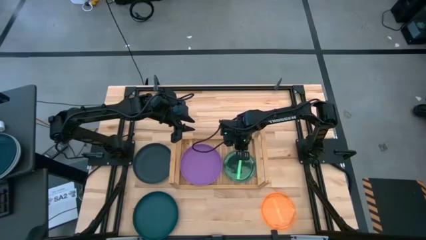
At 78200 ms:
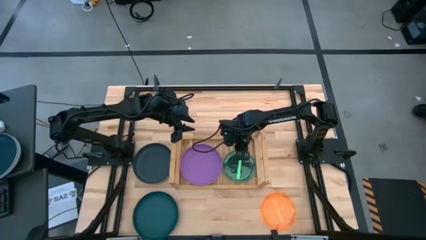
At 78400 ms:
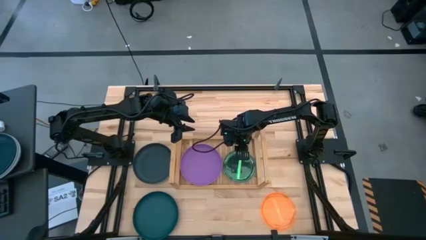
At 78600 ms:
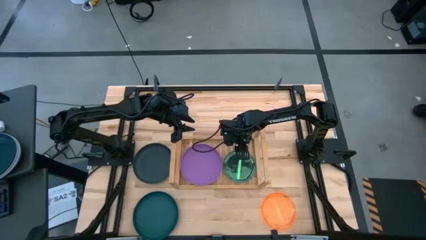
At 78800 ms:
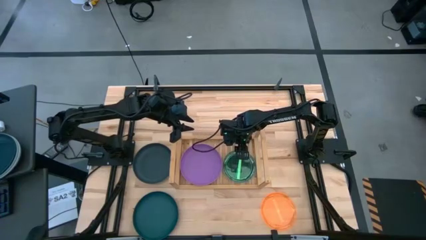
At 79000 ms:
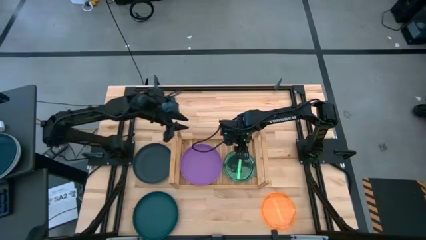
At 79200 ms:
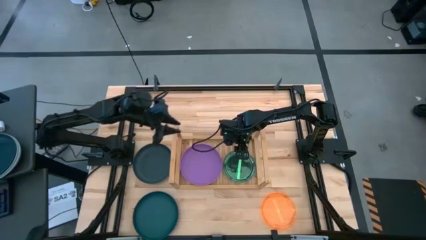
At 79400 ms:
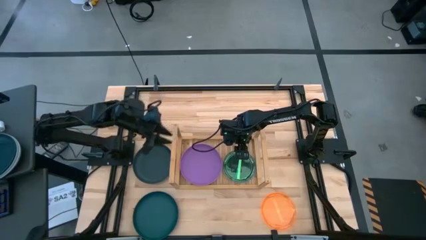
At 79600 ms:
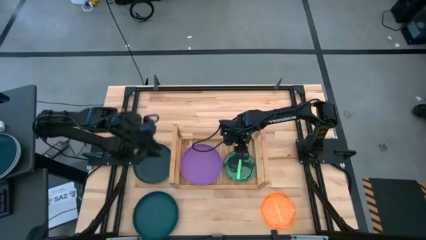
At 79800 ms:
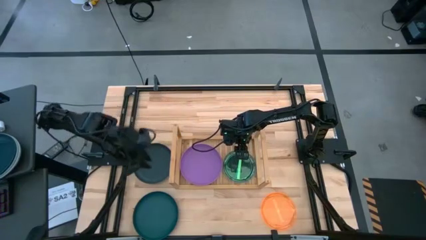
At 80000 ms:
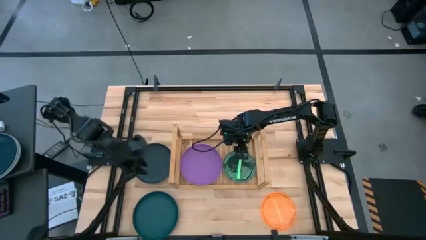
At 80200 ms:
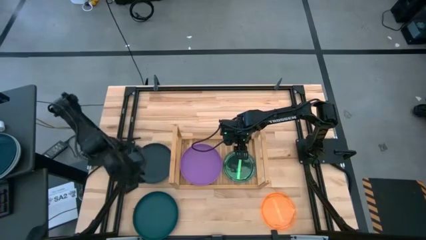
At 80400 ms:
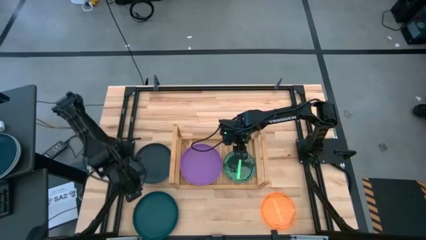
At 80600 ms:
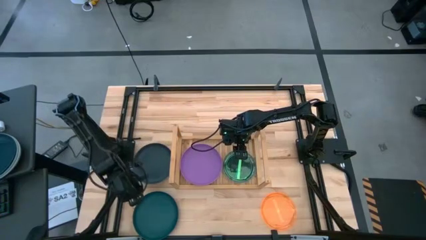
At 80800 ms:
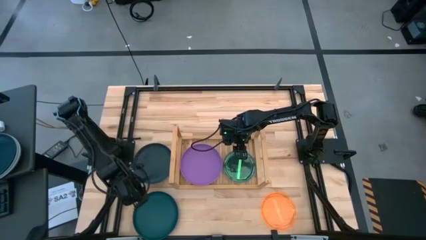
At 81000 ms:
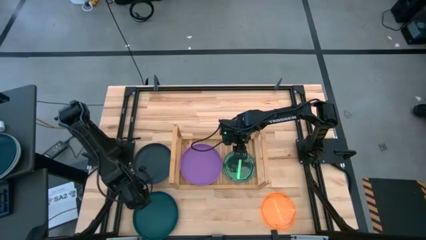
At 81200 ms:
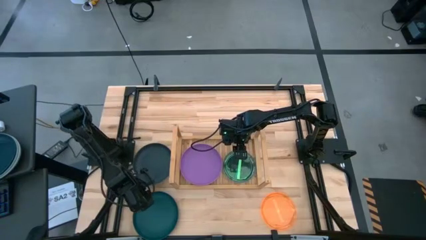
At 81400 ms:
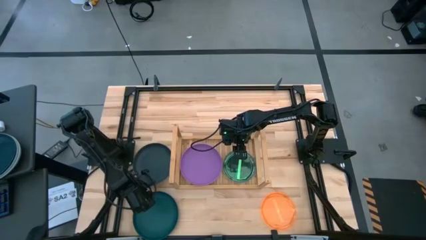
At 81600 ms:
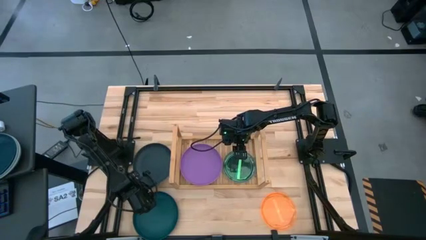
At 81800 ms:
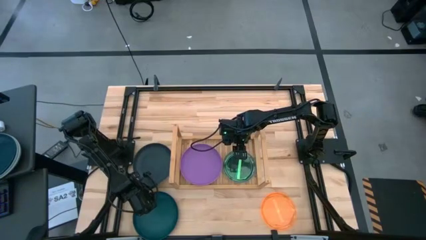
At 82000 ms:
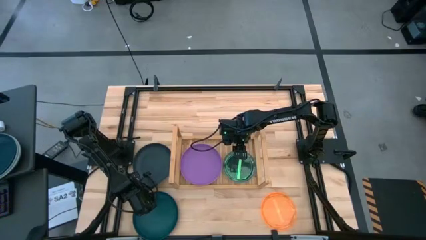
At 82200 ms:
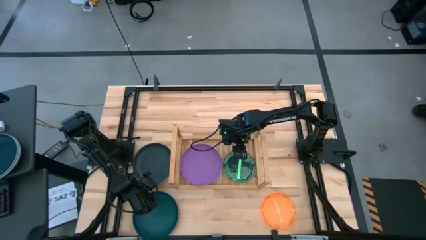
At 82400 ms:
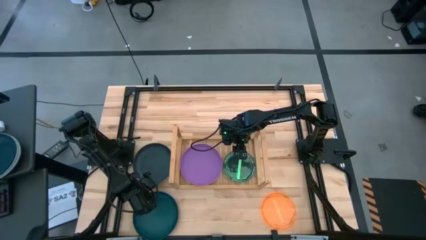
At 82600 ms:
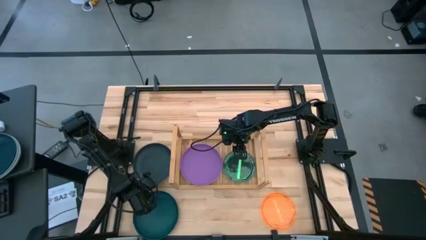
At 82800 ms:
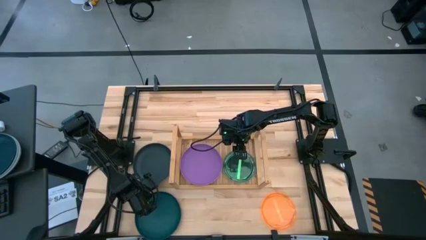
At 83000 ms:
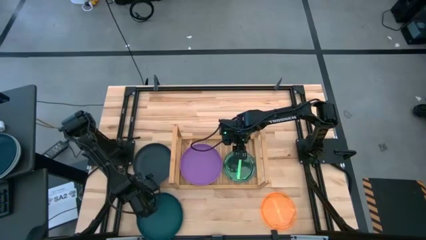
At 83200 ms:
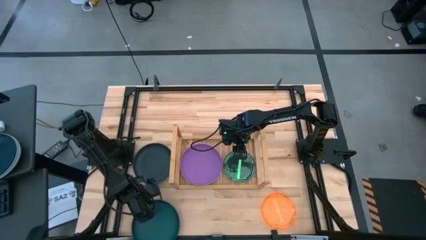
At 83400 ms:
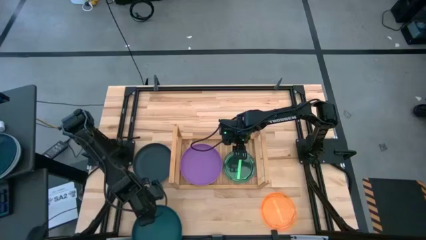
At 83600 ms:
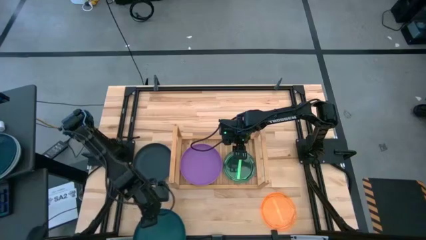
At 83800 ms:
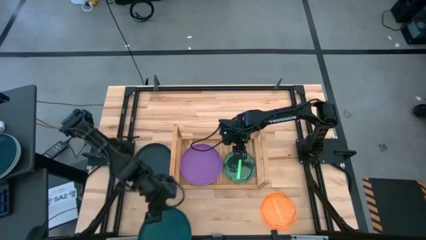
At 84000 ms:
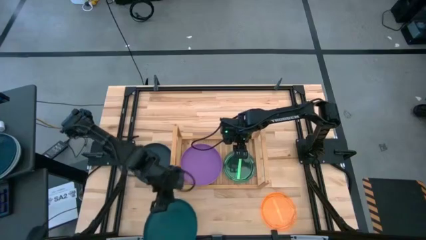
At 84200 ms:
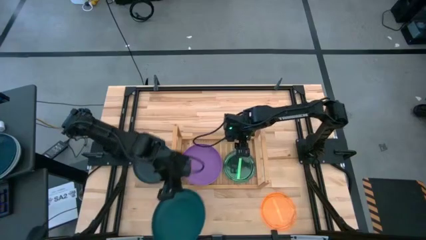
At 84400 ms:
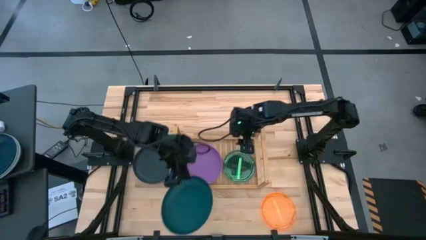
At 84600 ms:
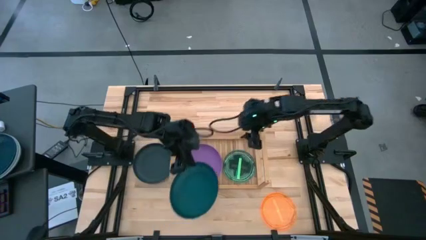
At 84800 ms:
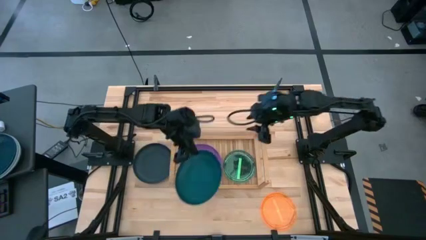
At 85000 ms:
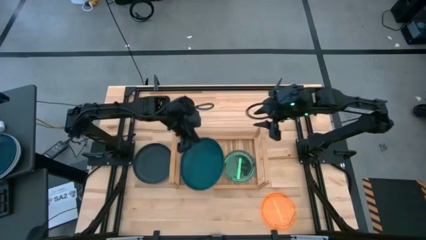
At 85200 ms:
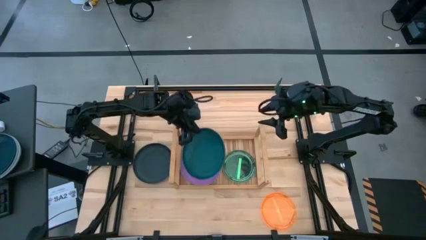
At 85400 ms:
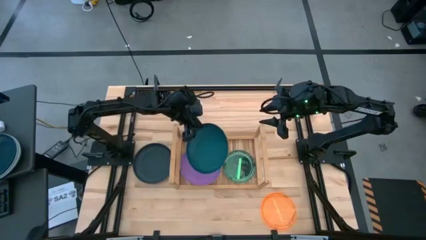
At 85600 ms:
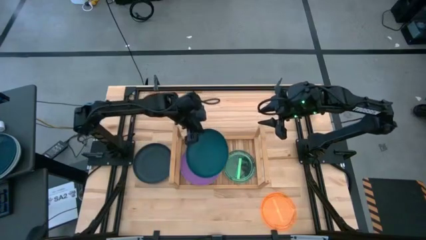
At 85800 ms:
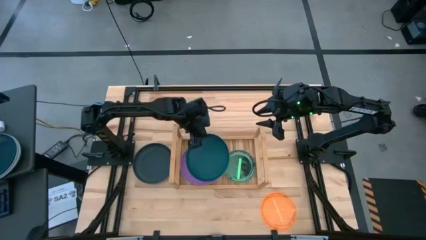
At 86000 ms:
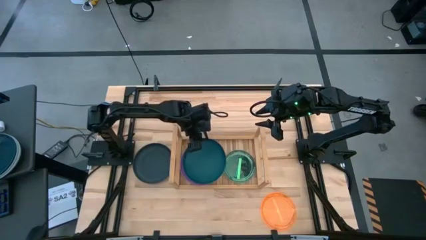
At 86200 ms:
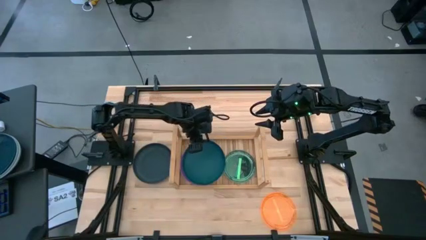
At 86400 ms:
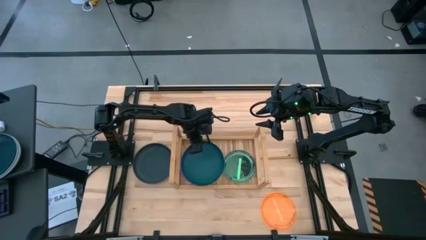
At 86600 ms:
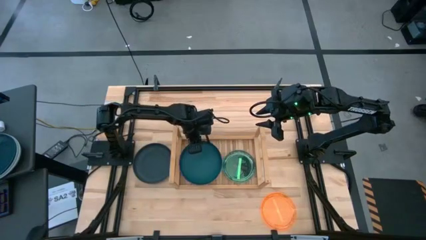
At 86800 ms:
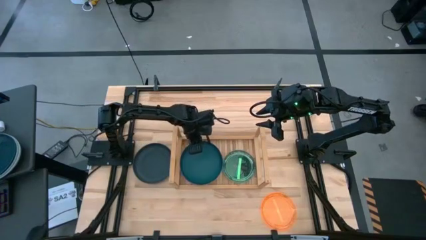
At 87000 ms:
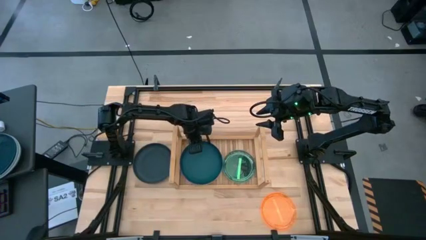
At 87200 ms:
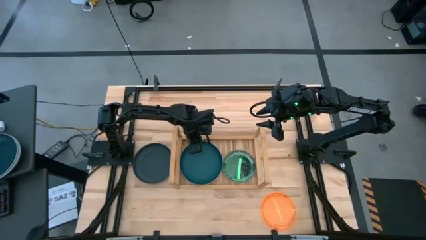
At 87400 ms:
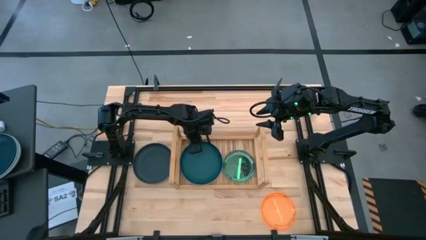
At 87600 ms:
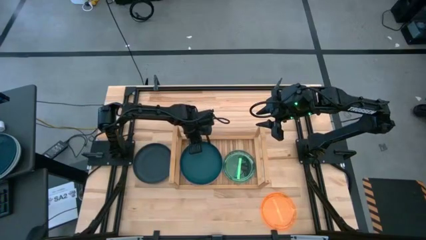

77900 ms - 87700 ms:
Task: Place and stack plates onto a shelf
Stack the dark green plate on top of the violet plate on the shelf

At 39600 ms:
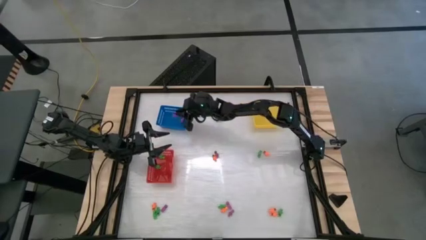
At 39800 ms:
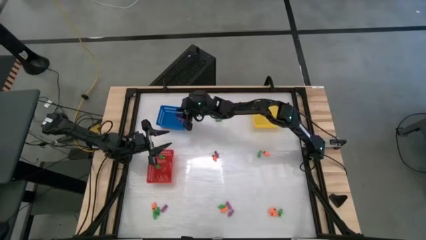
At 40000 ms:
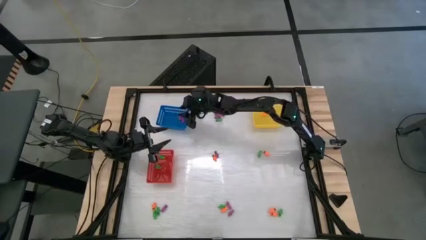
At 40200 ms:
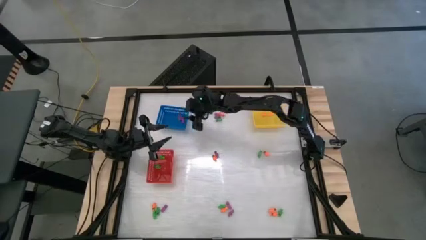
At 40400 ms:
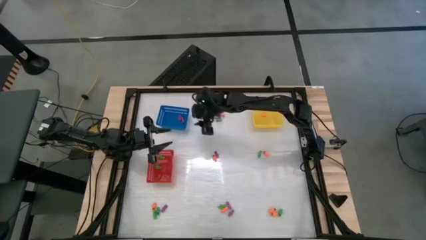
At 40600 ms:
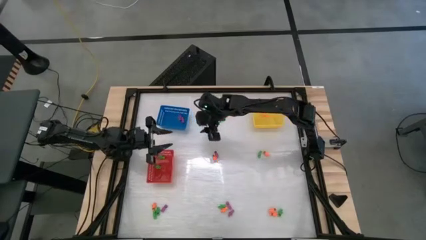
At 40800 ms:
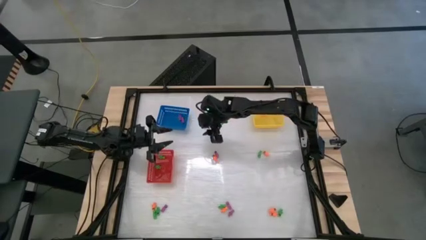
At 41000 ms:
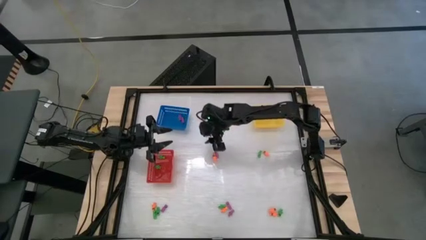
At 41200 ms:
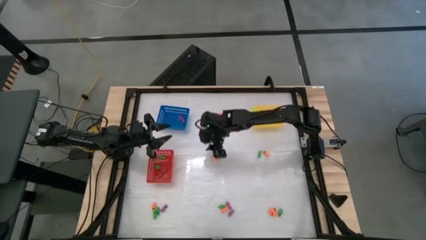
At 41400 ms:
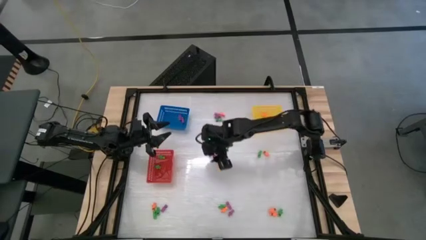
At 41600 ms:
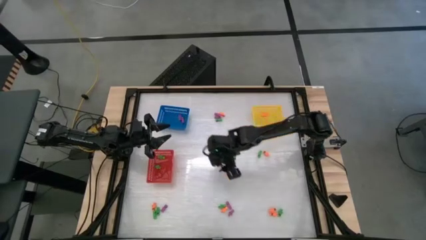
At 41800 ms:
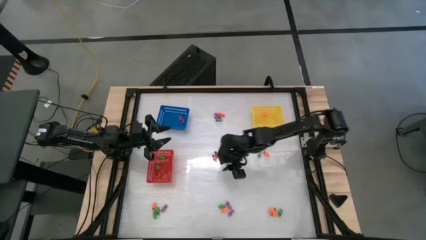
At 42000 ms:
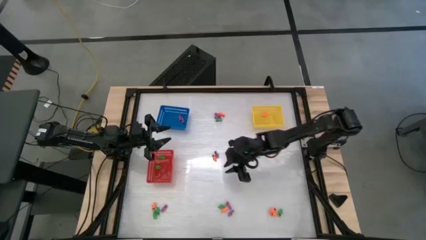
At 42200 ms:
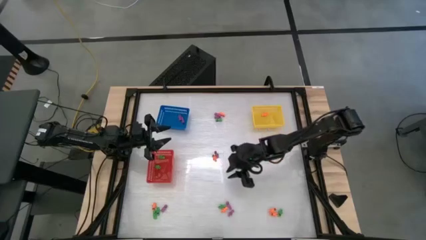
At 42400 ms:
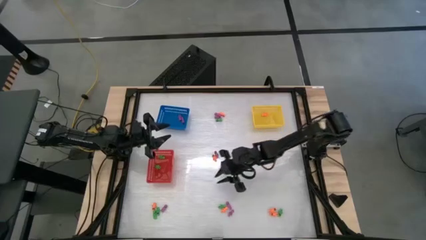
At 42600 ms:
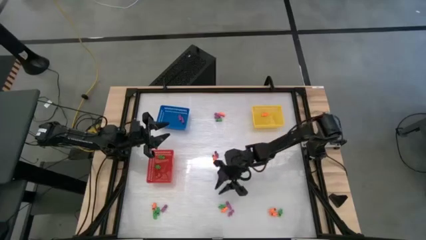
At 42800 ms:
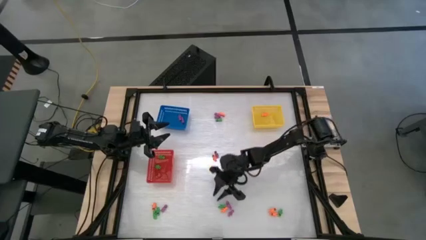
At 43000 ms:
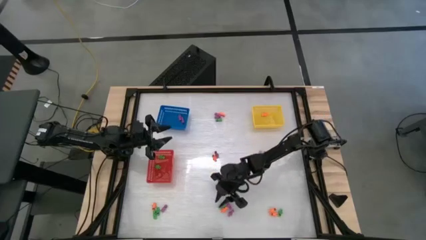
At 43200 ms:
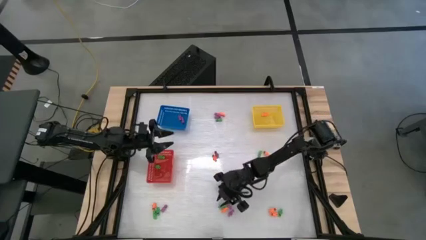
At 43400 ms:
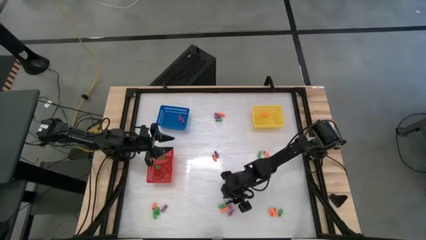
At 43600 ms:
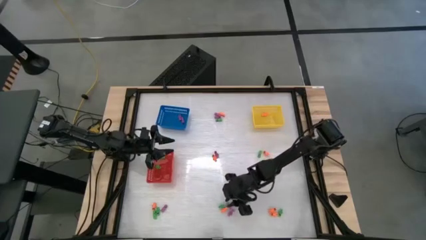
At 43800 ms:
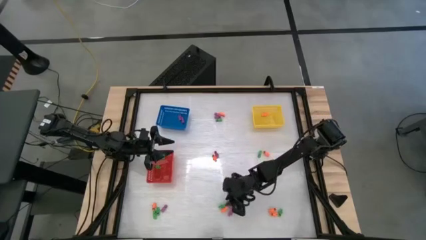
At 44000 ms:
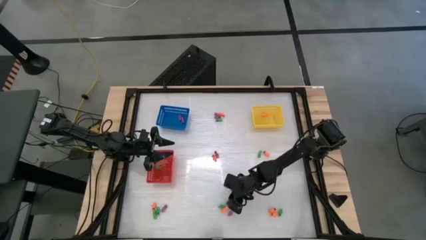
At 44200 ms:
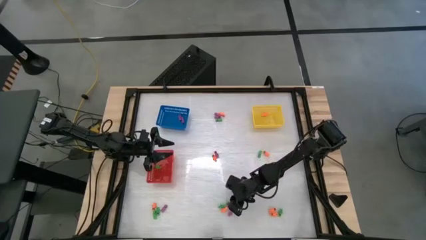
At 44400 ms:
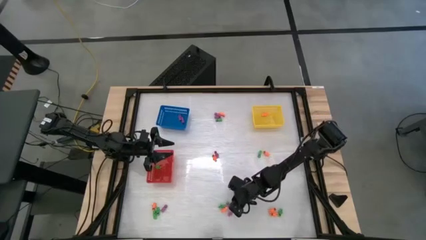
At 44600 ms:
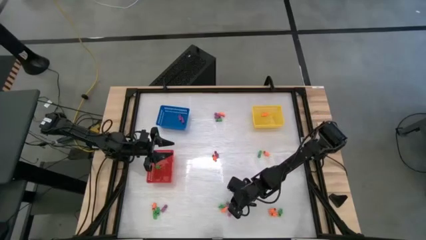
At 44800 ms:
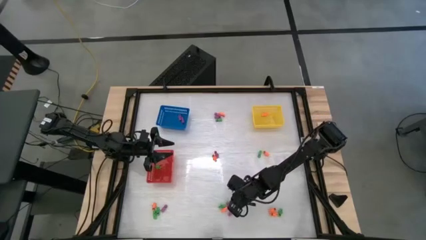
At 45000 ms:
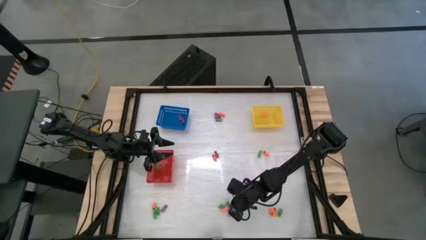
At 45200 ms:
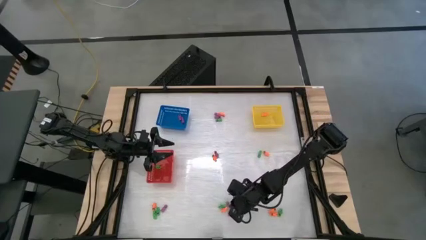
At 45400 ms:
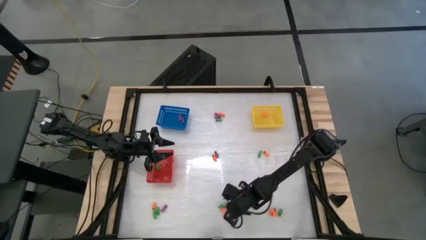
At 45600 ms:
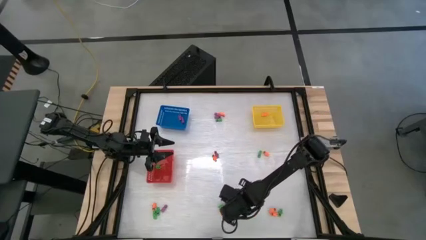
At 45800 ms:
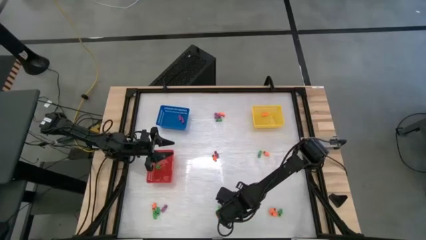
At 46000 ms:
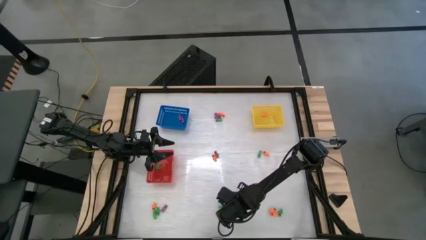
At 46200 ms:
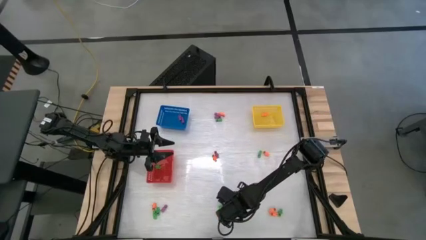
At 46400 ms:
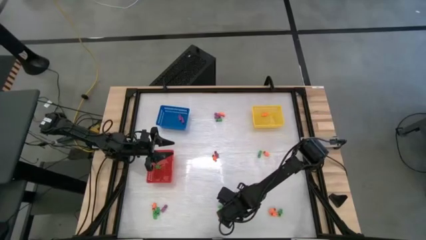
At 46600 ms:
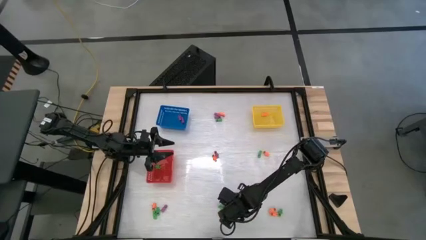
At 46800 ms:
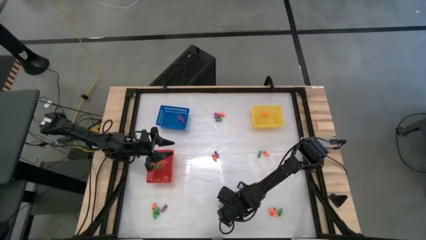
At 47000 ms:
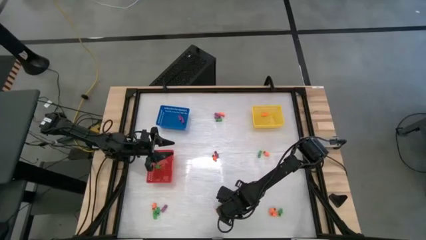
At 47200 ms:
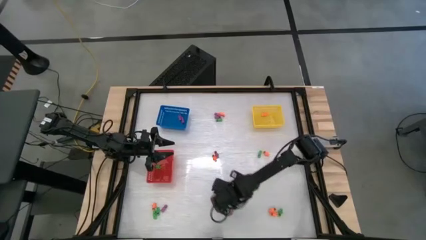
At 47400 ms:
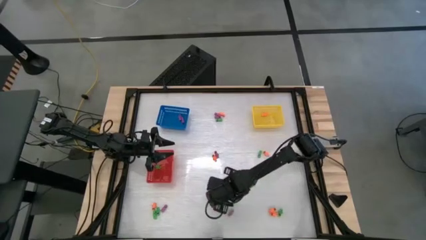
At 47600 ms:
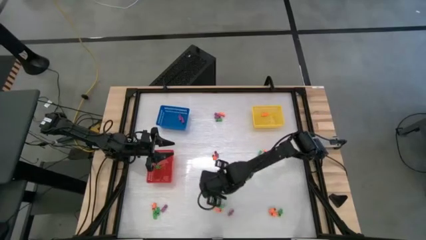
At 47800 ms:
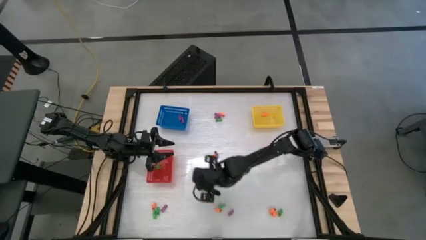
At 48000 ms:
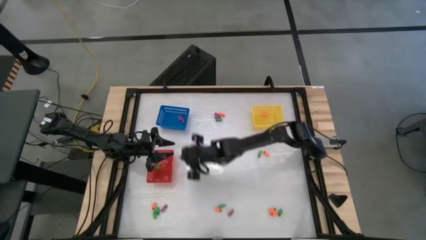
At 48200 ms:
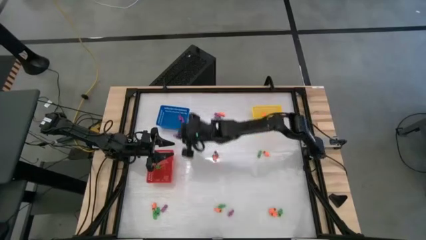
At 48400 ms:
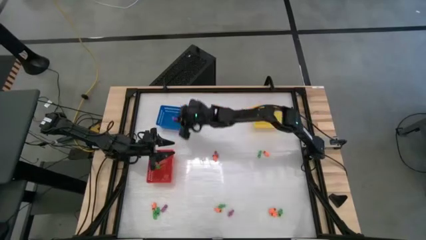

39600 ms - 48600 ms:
Task: Sort Halloween decoration
Put the violet skeleton toy into the blue bin
